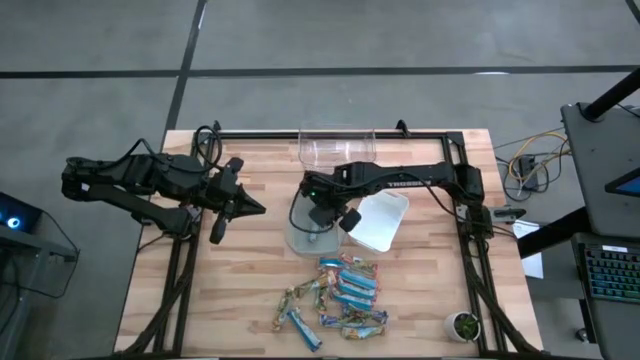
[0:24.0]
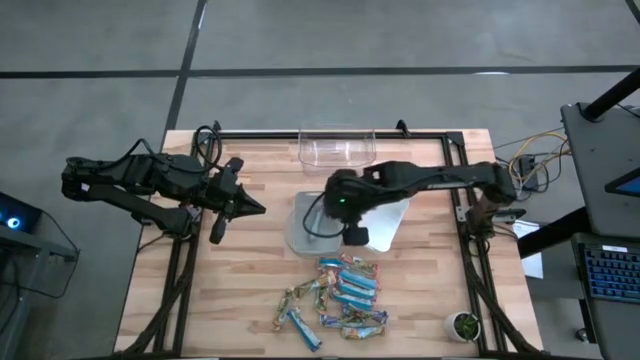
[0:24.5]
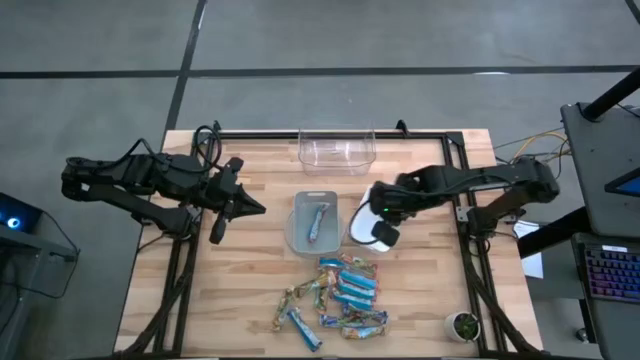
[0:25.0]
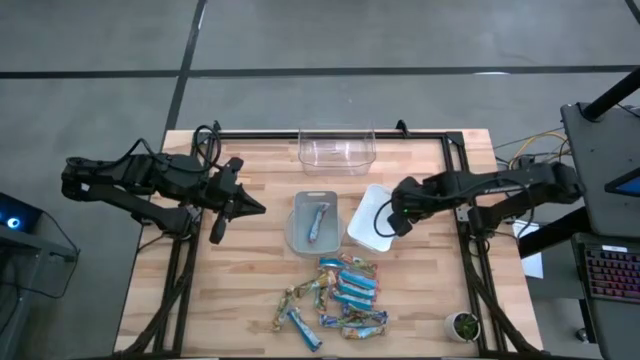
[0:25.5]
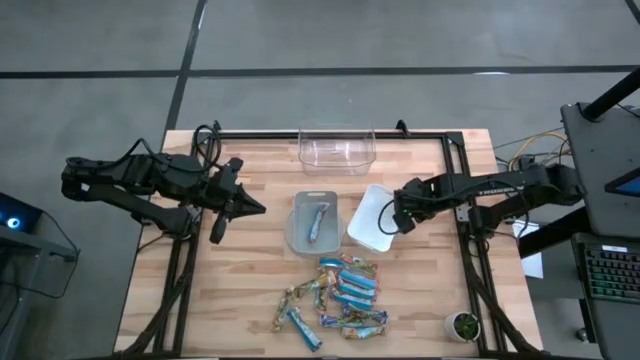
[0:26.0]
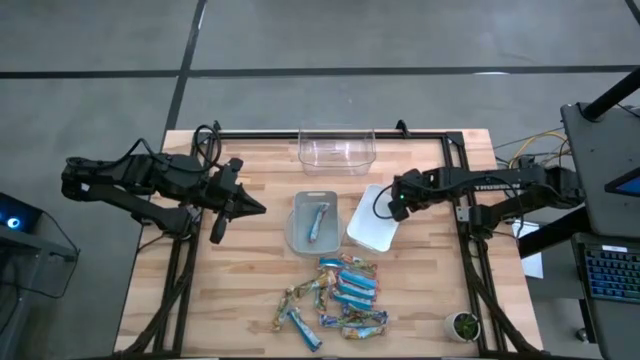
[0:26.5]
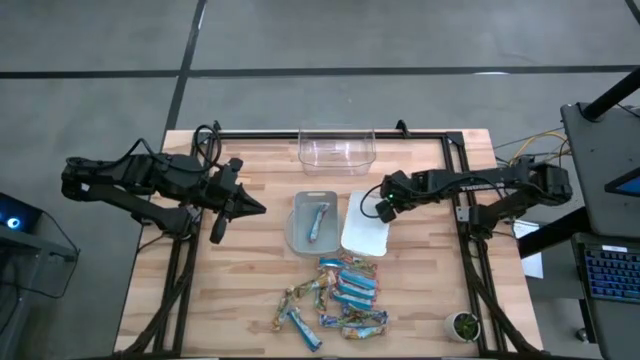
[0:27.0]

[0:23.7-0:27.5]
Task: Pick and place Granola Bars by type
Adjust the white bin

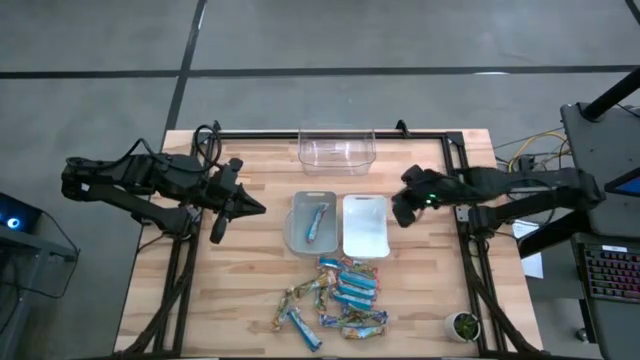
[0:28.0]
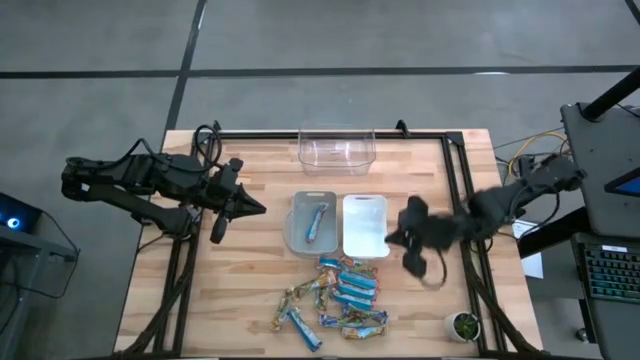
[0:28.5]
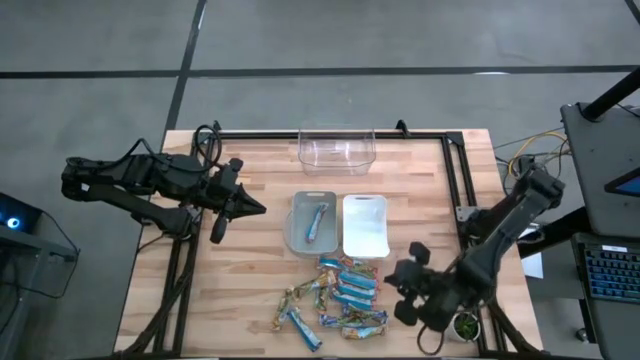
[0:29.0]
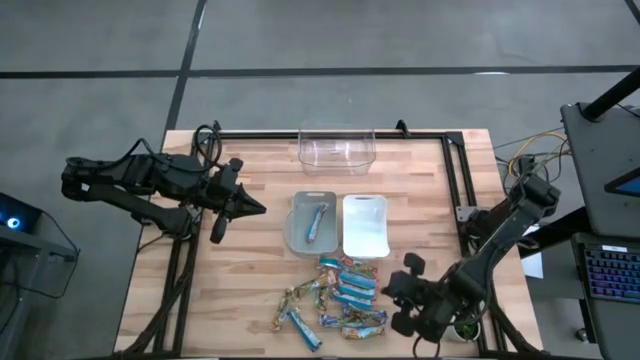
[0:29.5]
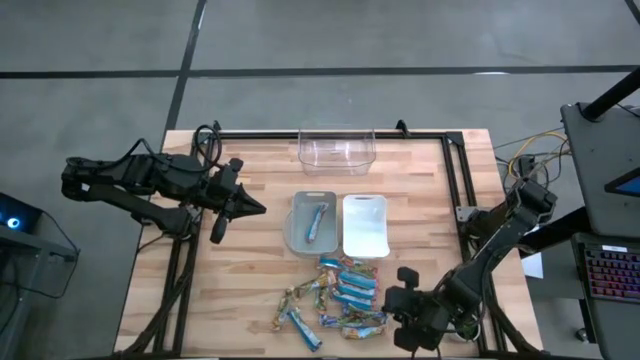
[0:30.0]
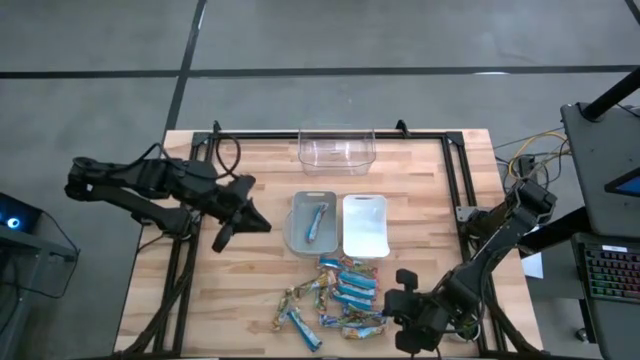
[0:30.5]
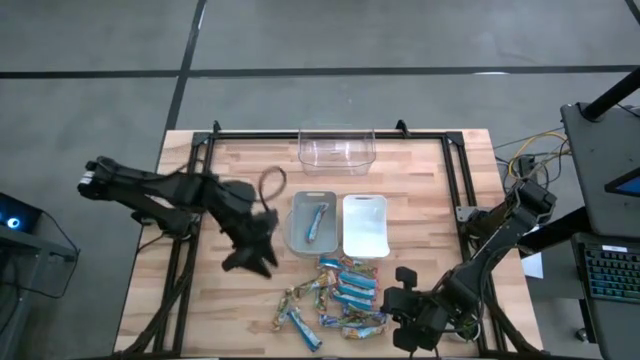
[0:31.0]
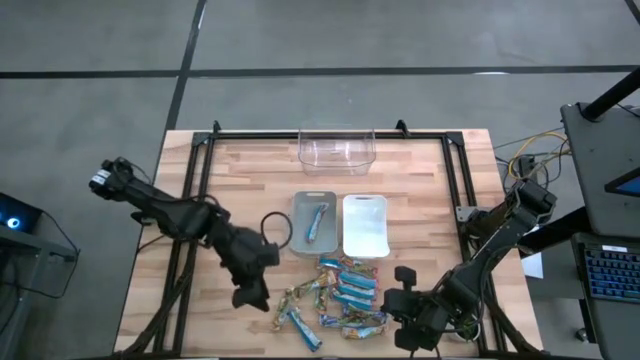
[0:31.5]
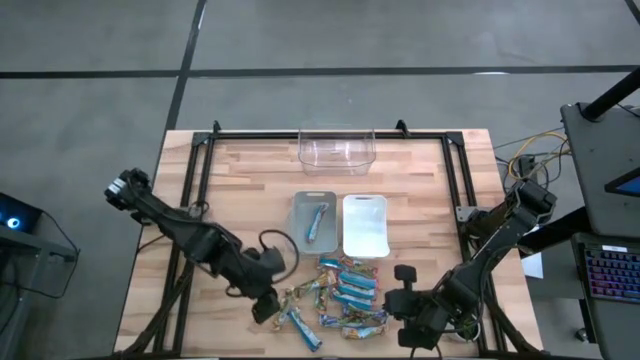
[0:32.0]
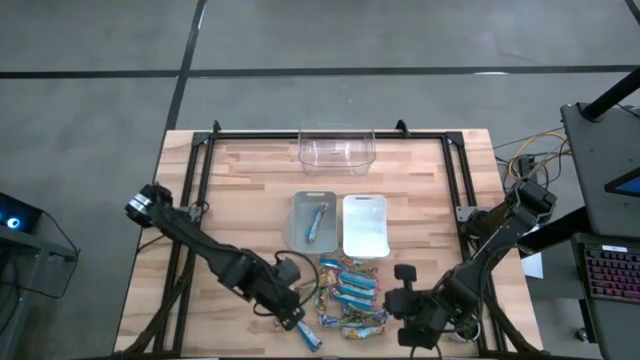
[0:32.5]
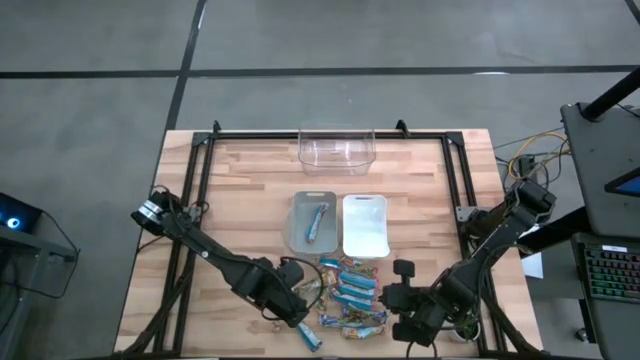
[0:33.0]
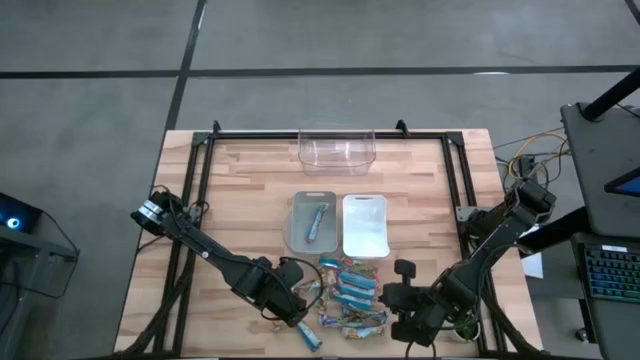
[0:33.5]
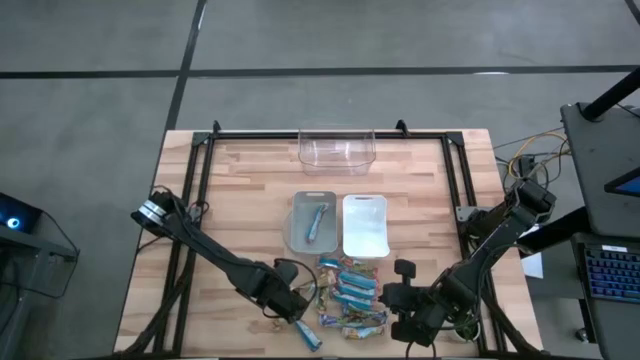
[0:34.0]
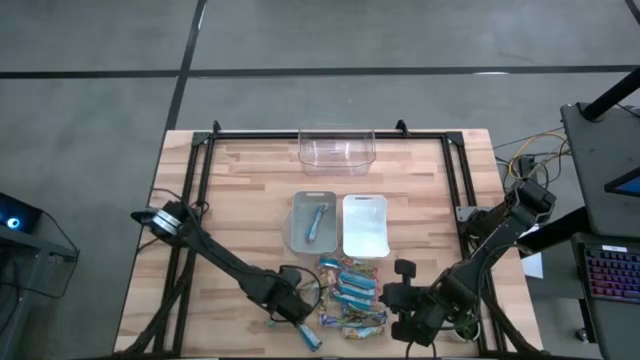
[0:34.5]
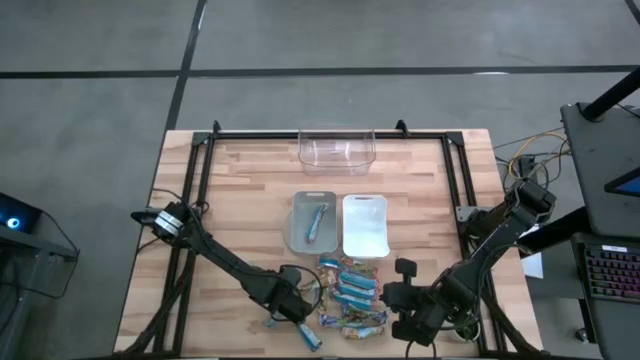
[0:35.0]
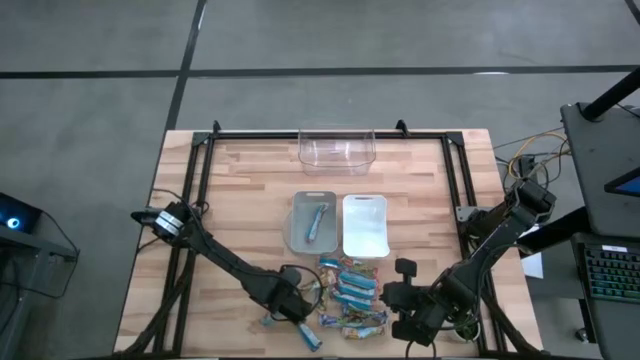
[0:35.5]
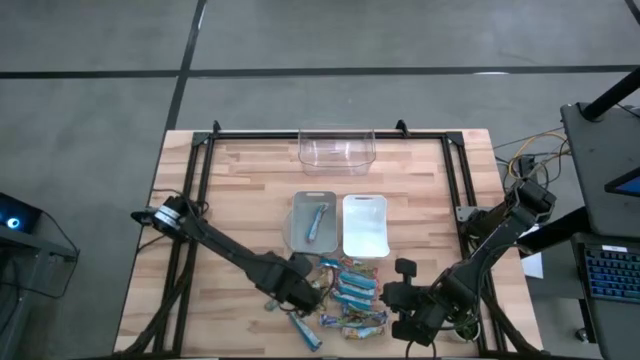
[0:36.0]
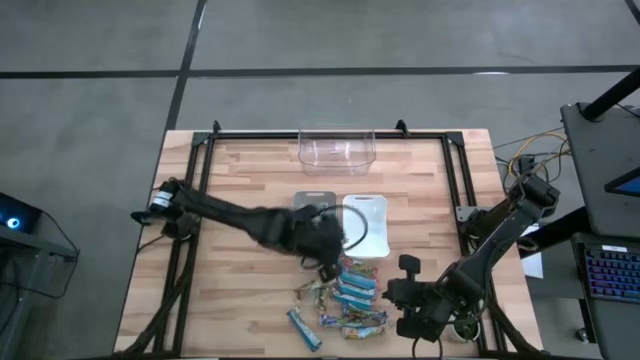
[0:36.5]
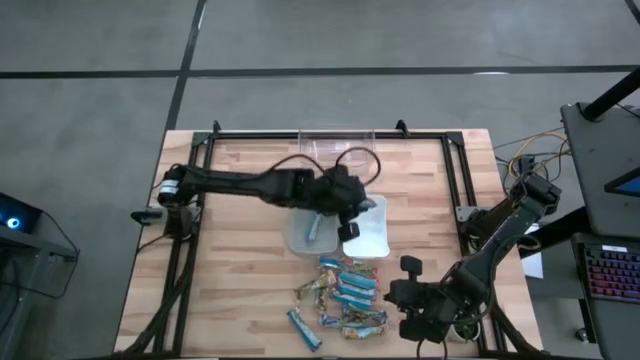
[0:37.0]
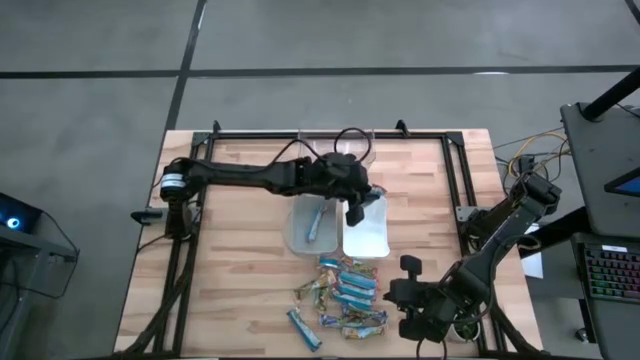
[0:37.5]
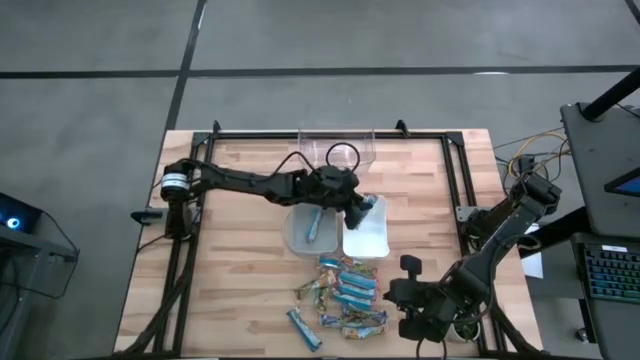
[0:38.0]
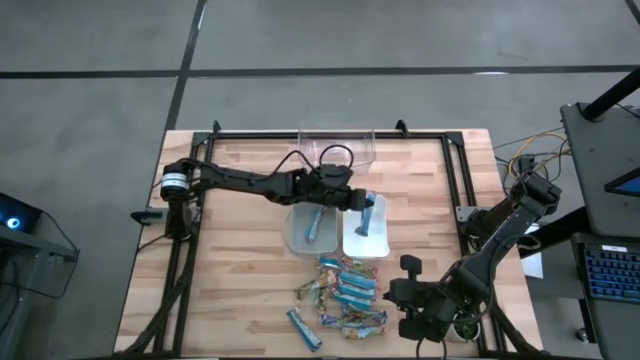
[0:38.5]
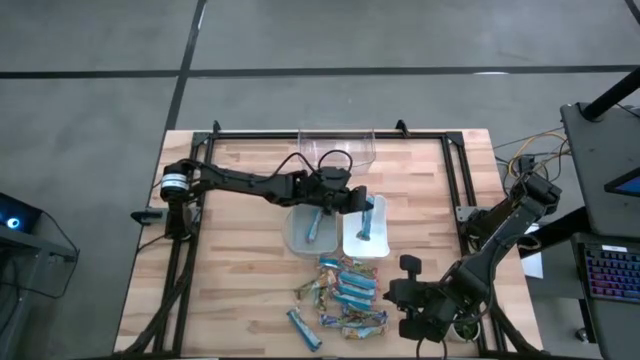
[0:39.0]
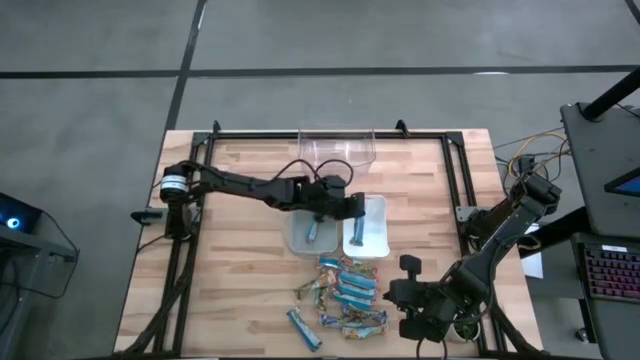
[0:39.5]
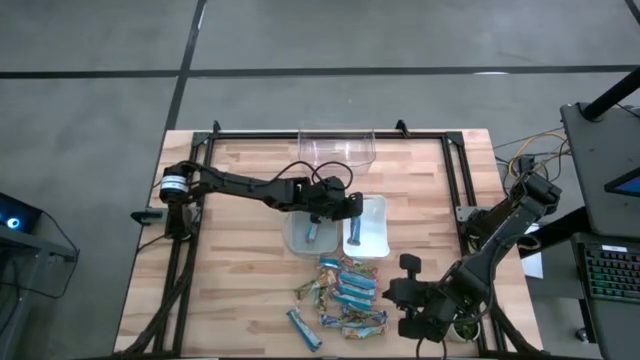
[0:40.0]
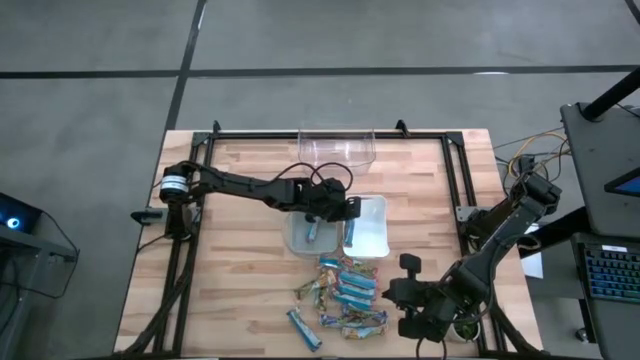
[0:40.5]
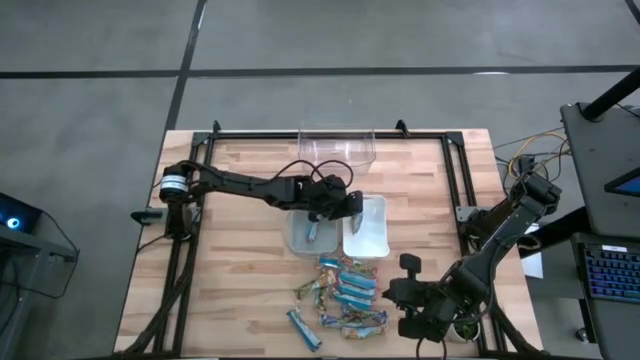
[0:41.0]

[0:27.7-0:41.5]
Put the orange granola bar into the white bin

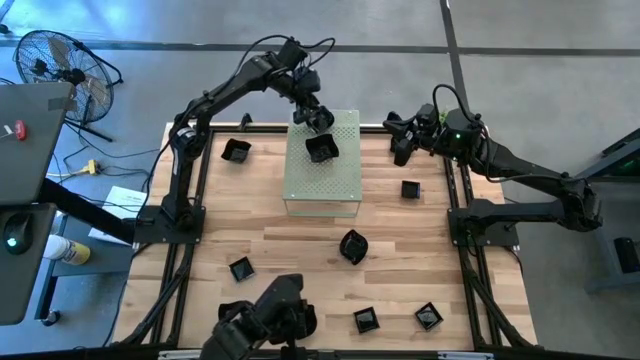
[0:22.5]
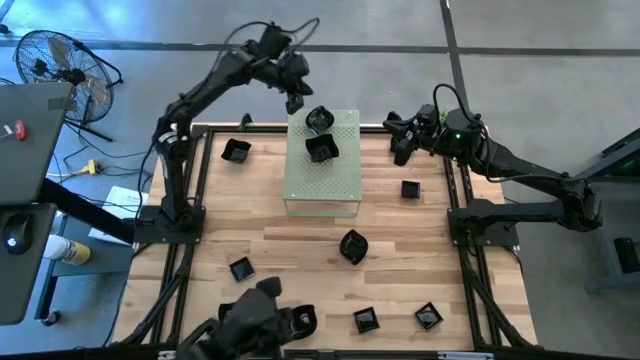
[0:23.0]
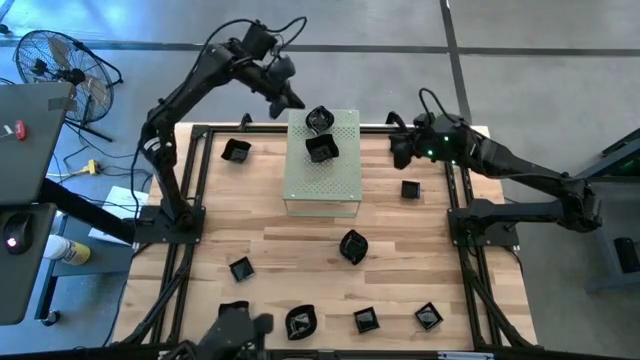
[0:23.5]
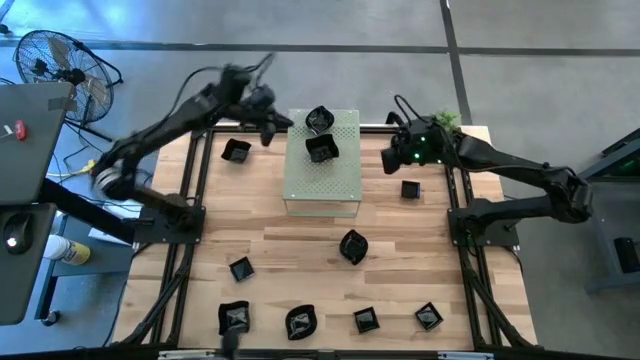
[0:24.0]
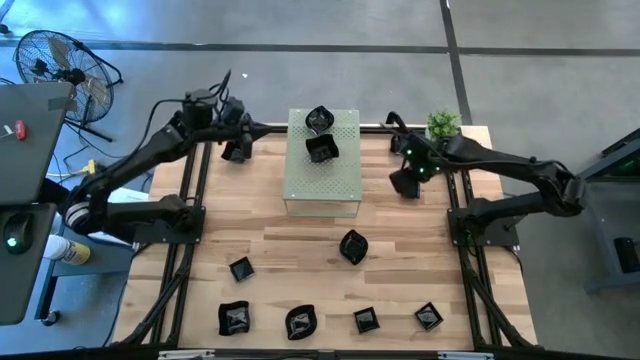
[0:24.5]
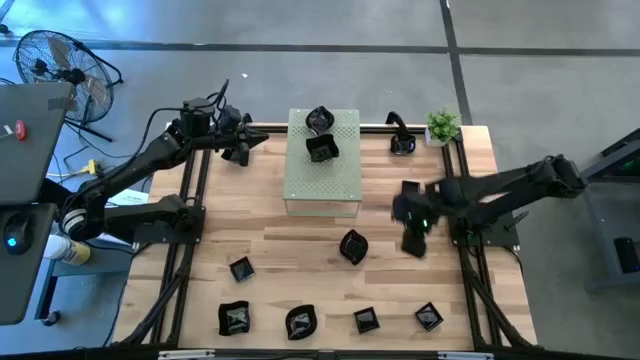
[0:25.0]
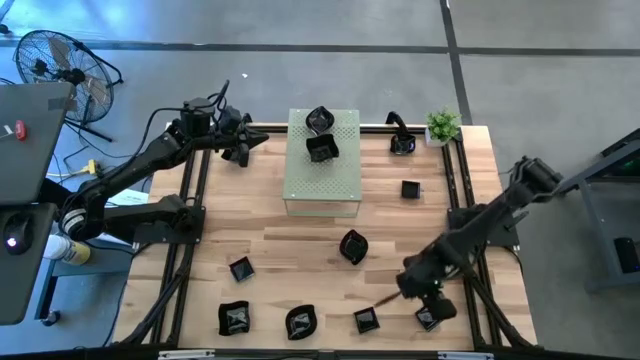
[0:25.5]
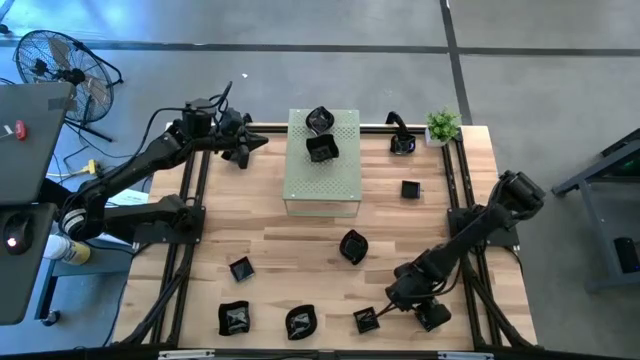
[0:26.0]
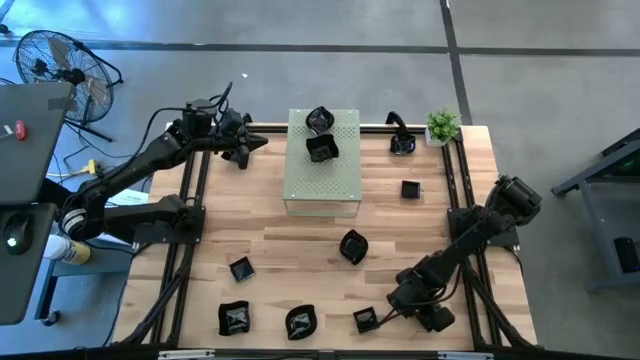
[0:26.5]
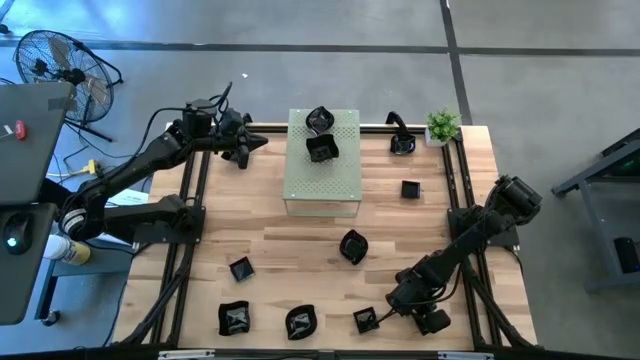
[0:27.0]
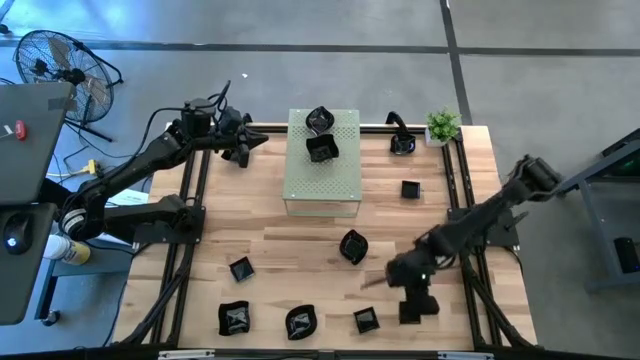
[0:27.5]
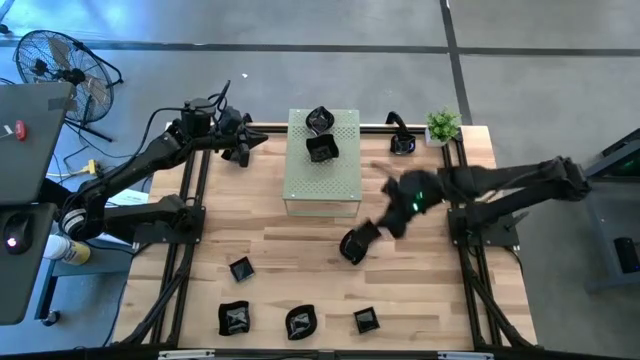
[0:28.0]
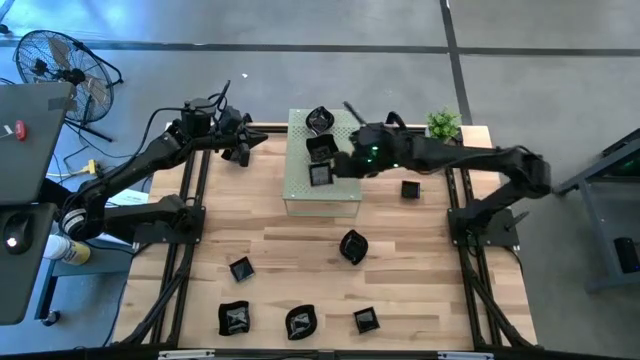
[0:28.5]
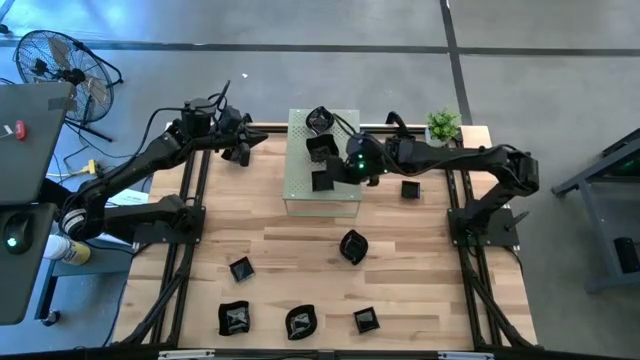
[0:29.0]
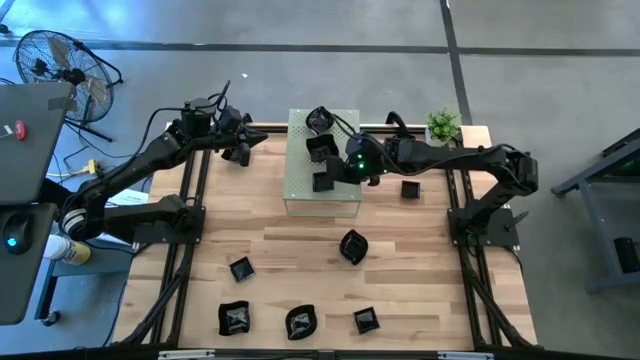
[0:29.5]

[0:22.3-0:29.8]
Task: Pick & Place Mini shaped plates
Put the bottom right black square plate on the shelf
